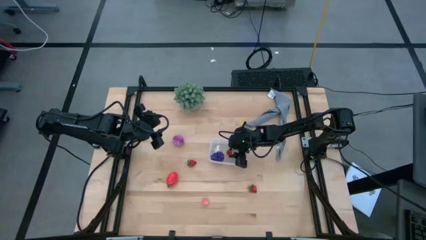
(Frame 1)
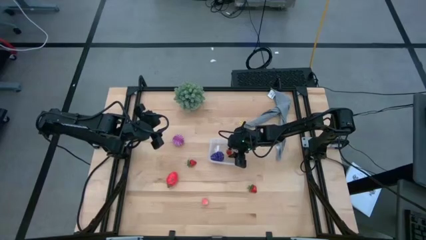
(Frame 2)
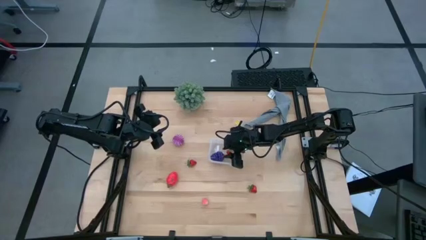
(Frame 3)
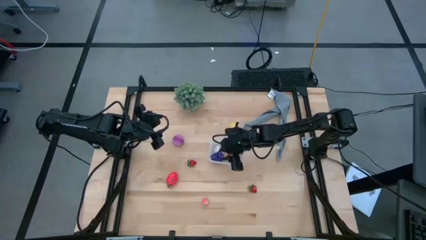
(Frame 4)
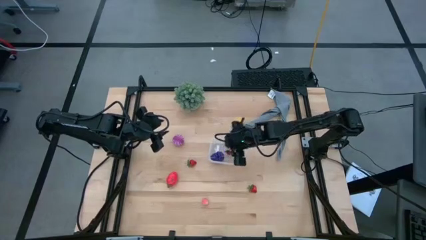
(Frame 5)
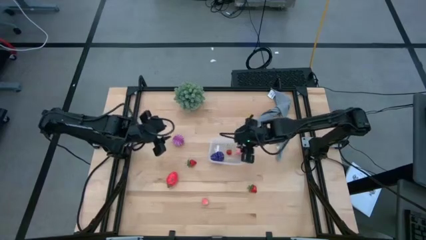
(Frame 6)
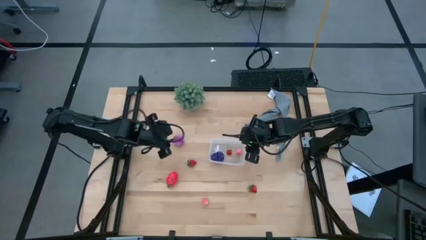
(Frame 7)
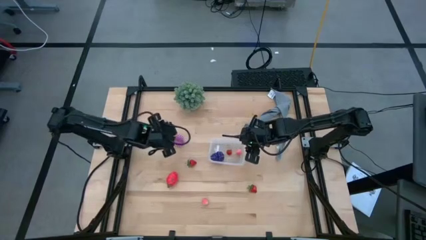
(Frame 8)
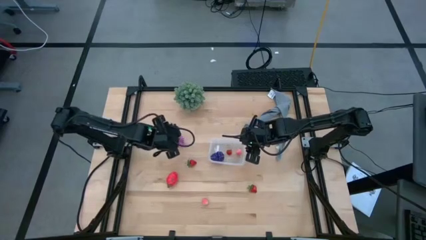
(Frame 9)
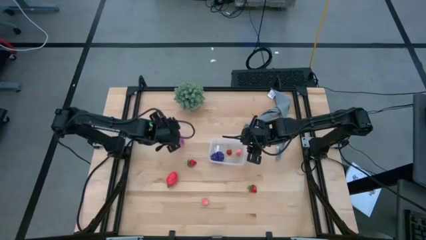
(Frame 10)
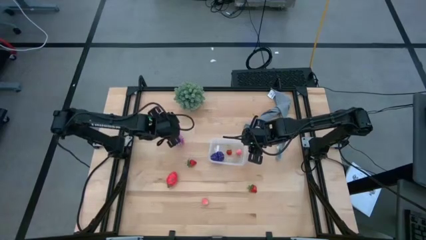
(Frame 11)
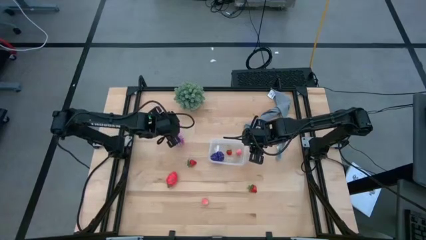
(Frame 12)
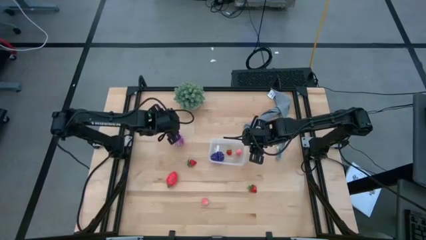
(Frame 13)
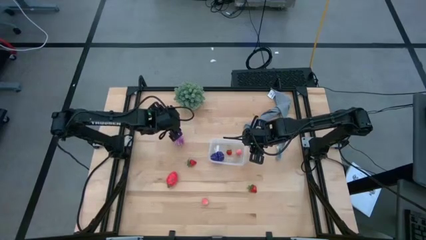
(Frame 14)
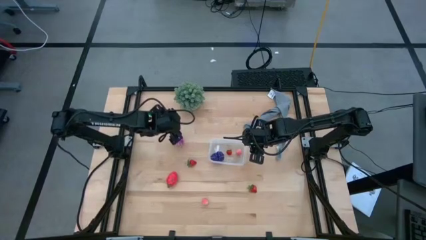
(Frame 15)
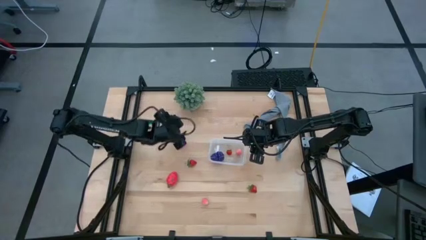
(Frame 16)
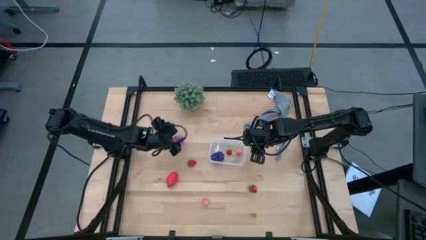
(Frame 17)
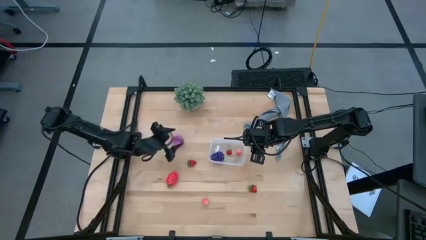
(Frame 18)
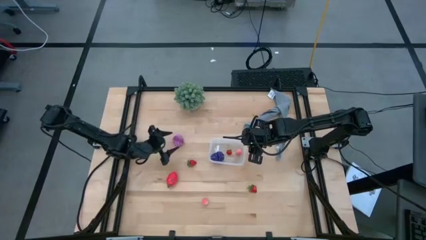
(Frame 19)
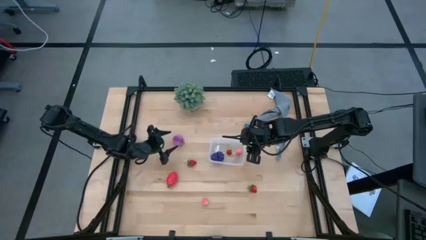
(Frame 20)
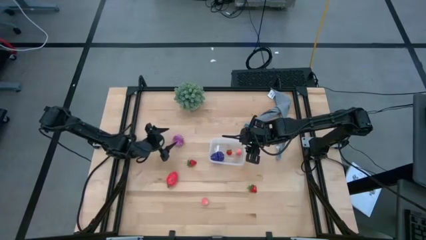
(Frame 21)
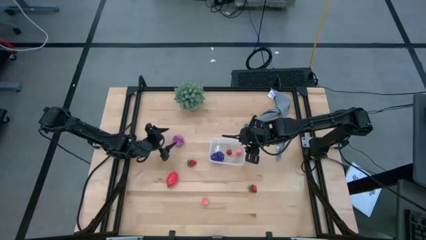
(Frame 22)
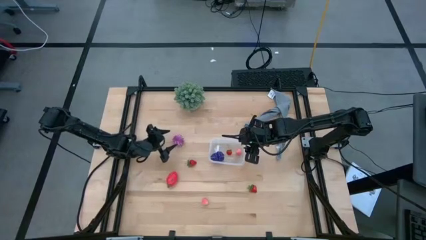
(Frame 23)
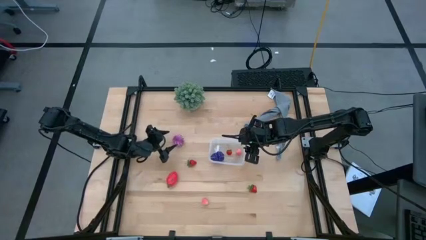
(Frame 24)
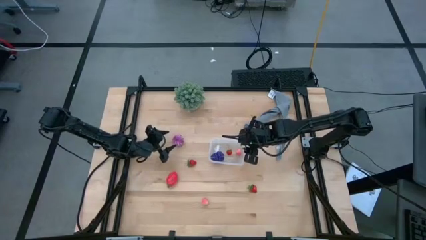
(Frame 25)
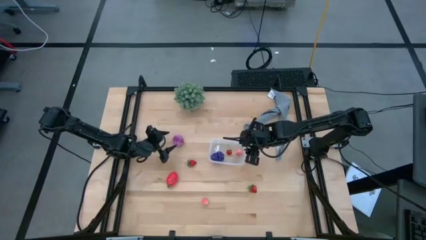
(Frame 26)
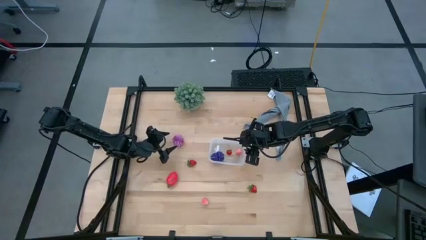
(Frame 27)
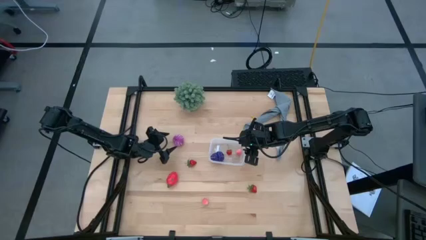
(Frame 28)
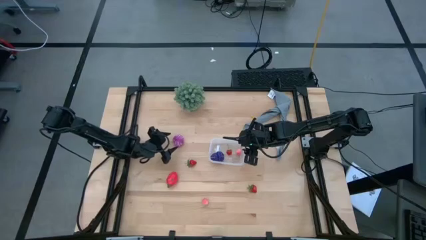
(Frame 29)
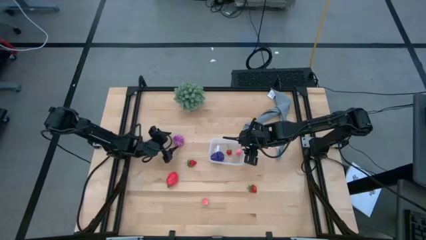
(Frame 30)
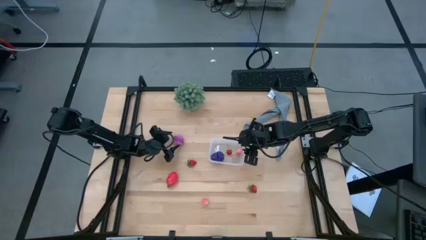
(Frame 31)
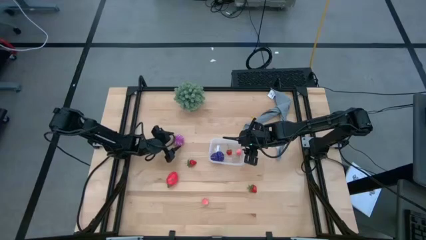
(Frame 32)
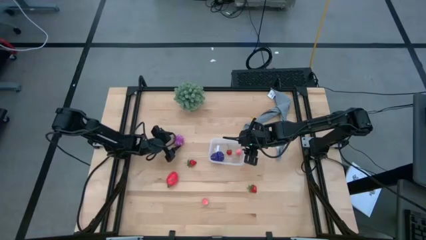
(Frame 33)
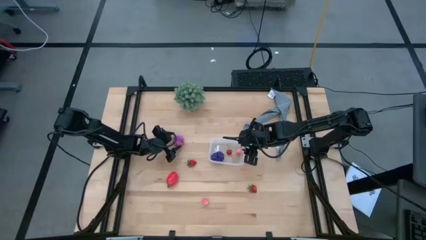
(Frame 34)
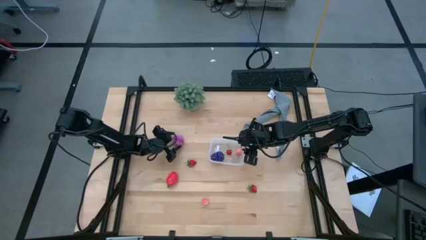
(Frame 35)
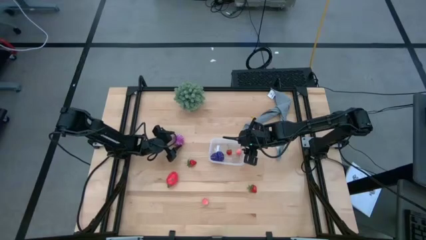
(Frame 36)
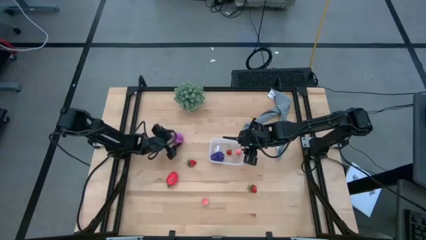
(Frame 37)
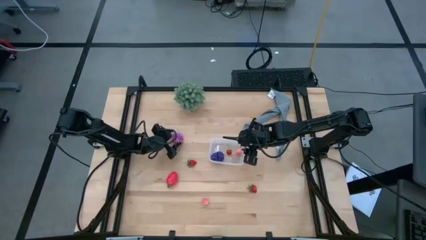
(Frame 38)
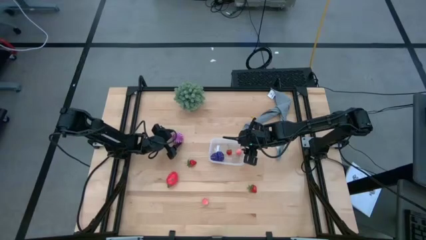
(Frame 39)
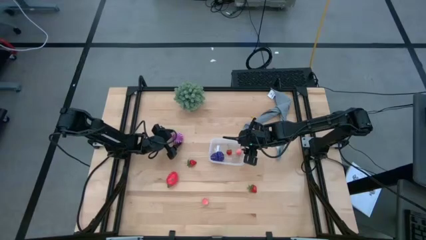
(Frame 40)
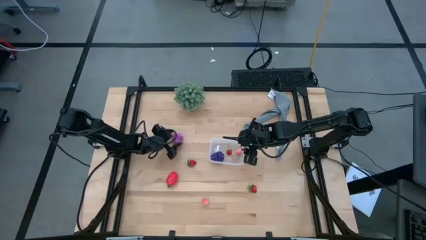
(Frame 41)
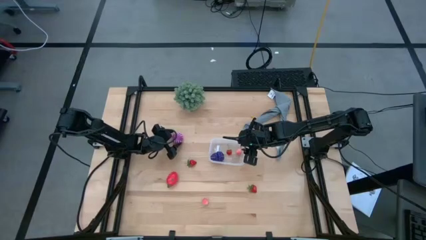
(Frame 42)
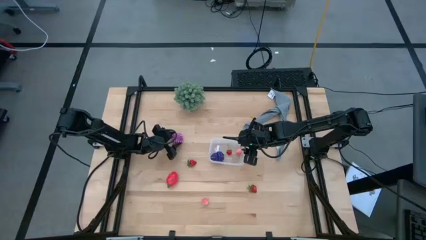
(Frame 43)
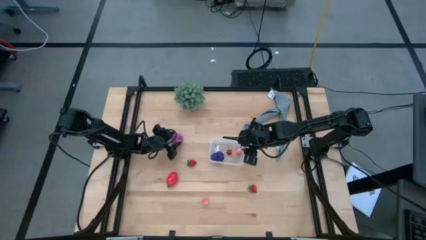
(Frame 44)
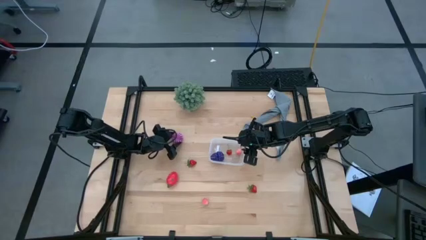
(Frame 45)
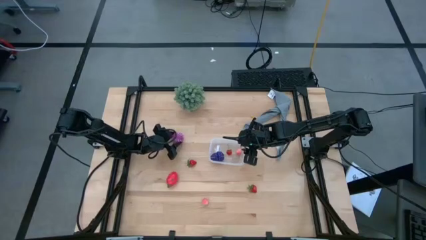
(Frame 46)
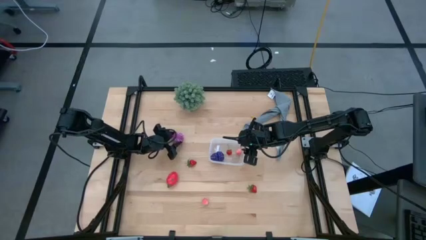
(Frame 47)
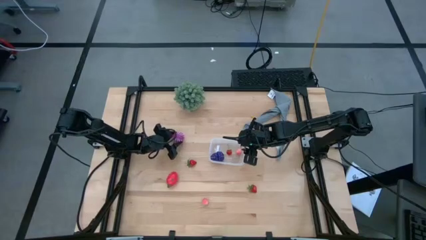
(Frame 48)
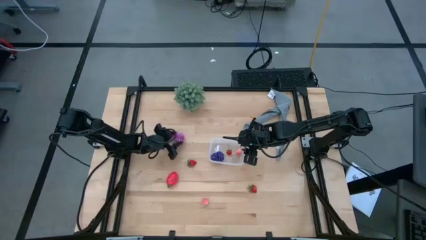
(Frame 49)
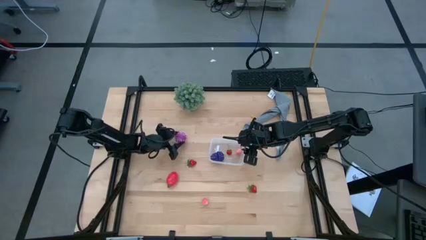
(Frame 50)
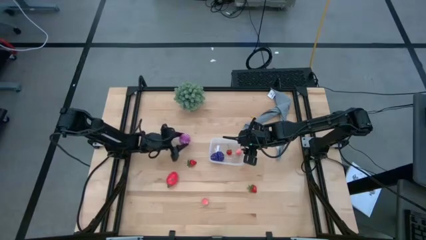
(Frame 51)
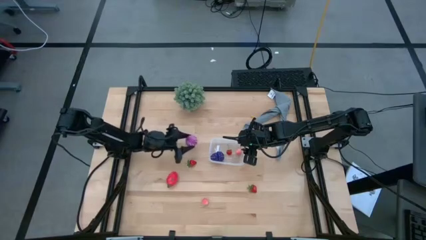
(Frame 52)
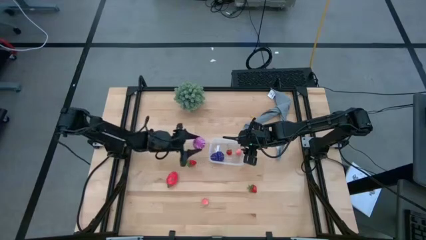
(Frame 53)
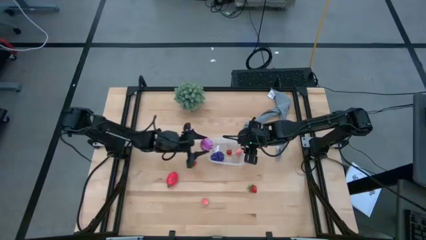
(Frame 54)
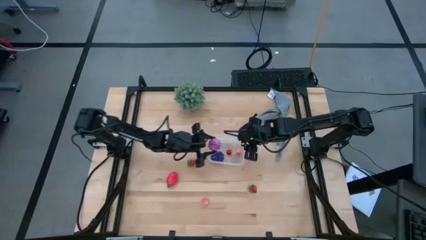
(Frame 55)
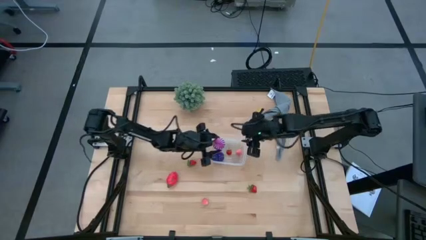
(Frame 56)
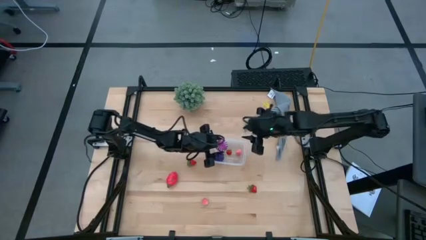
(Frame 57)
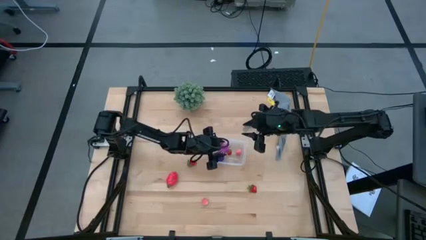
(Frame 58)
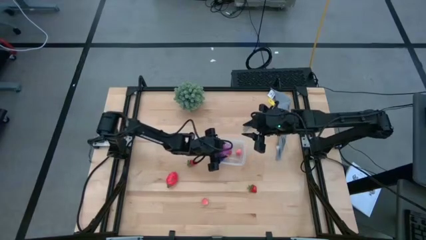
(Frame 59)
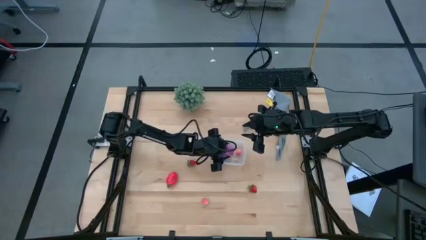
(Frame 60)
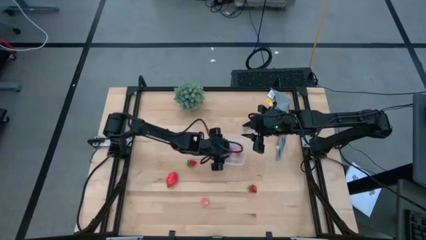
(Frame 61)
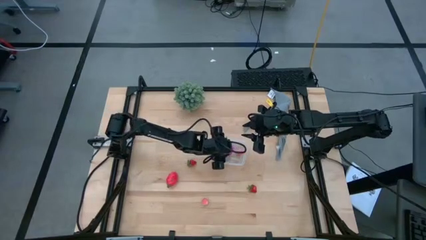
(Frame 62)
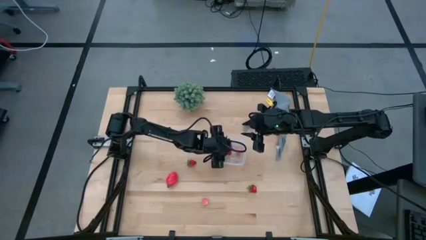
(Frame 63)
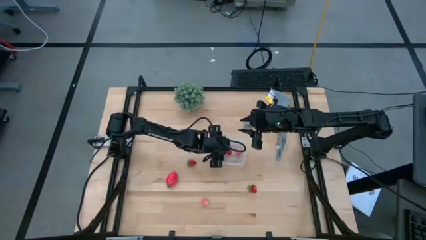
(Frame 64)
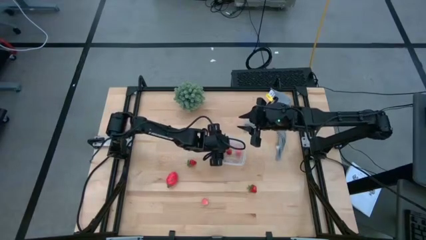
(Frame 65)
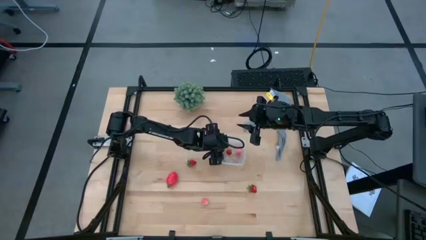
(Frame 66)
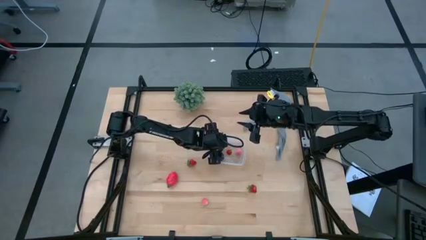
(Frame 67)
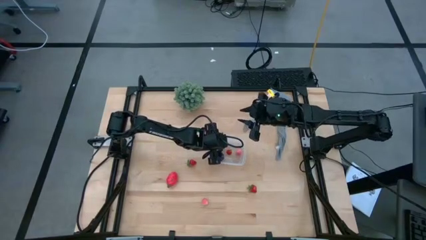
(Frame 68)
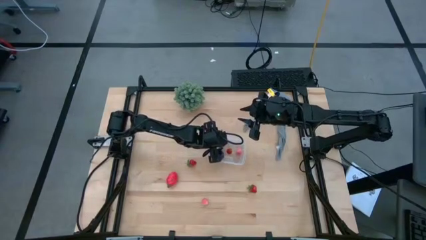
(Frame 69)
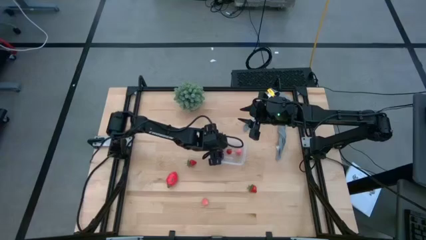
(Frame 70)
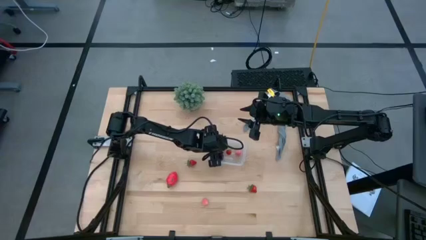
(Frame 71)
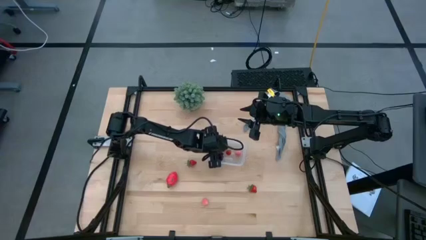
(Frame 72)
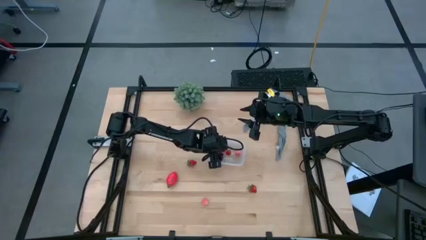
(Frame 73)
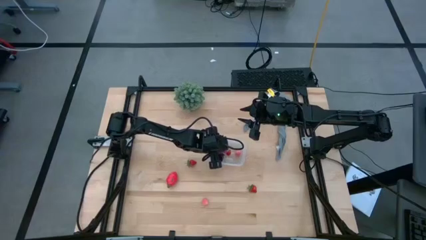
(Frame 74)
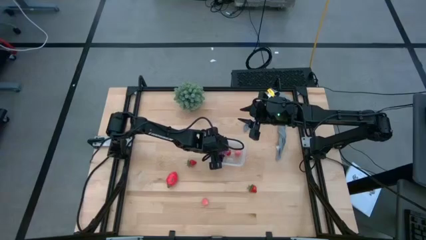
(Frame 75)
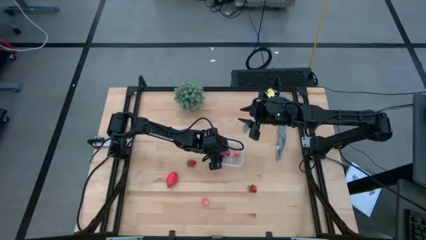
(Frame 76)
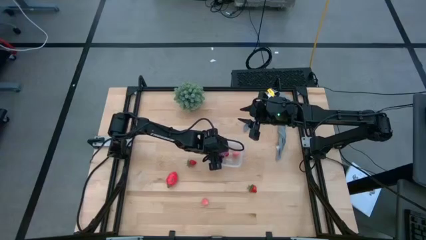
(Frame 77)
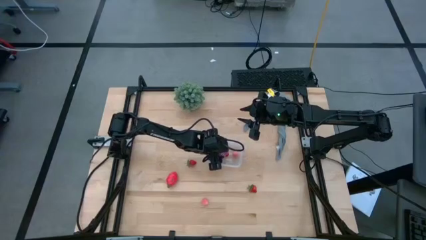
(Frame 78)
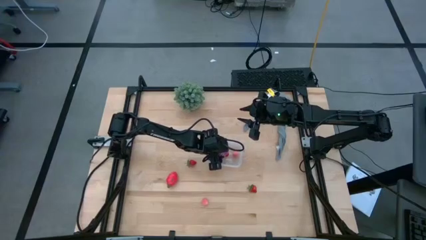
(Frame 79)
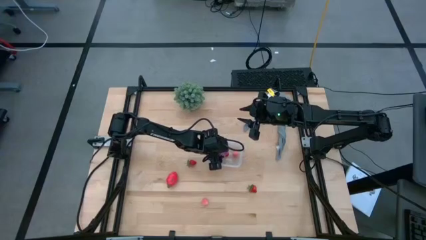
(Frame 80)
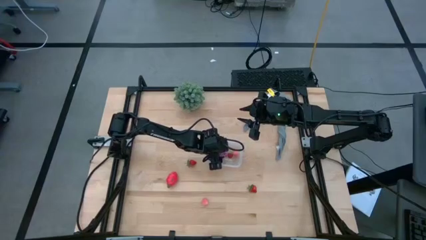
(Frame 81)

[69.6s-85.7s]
Task: Pick and placing Produce into tupperware
Put the onion into the transparent container

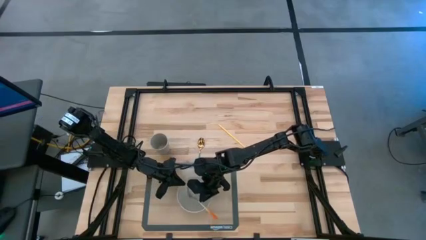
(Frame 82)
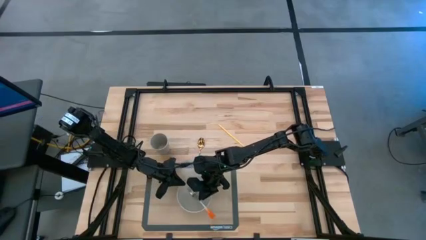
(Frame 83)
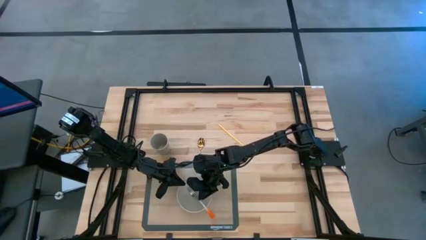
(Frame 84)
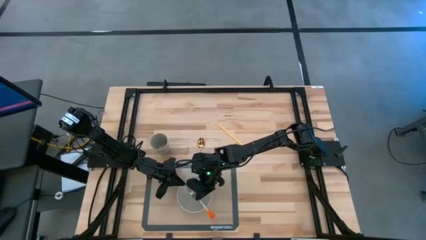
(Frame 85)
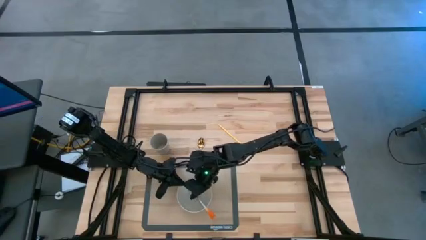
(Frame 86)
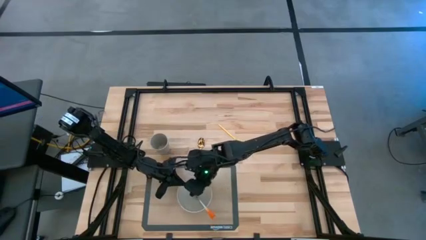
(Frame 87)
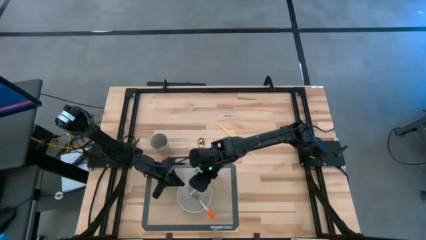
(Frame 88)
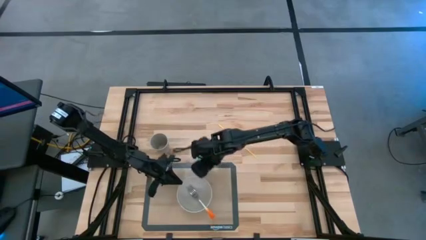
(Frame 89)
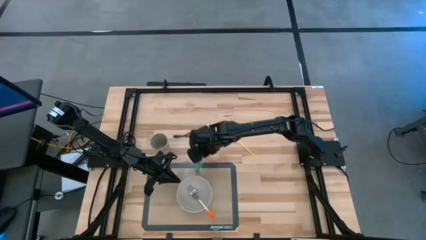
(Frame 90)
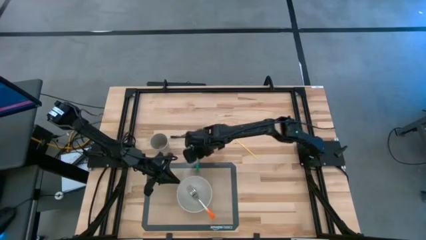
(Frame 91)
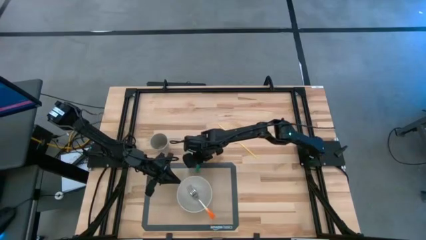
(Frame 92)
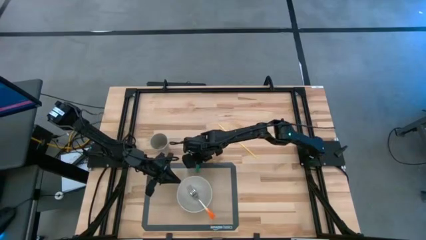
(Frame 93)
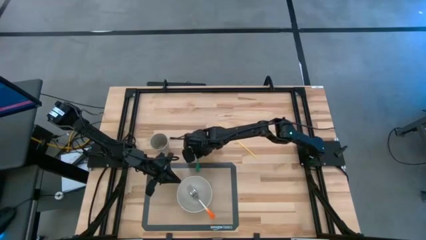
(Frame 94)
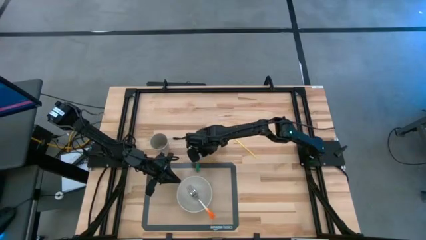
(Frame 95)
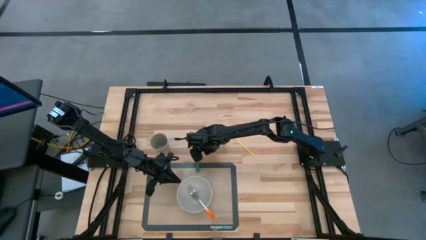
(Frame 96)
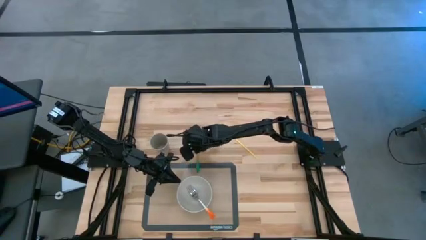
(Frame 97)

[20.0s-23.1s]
Task: Pick & Place Utensil
Put the green spoon into the white bowl
